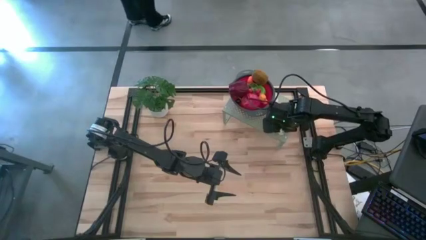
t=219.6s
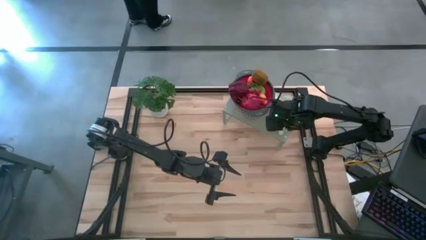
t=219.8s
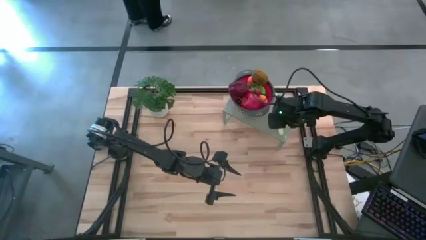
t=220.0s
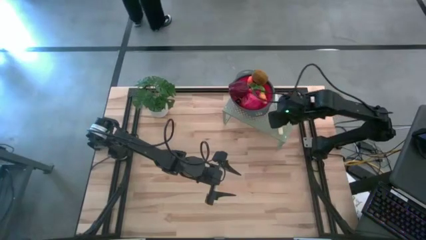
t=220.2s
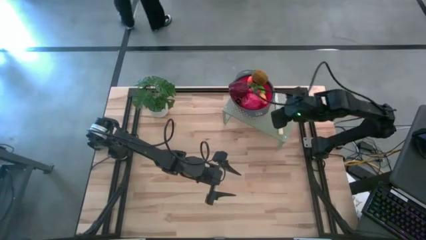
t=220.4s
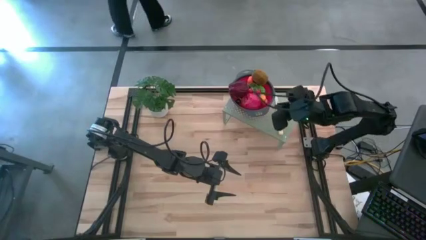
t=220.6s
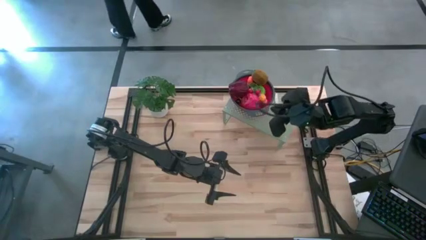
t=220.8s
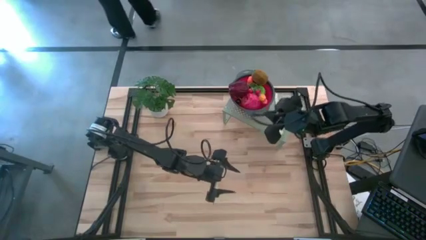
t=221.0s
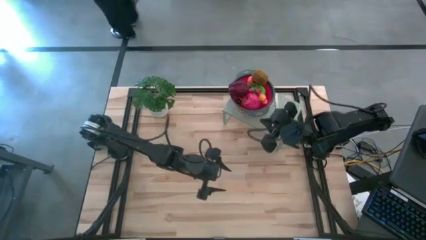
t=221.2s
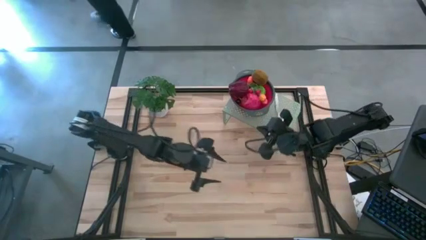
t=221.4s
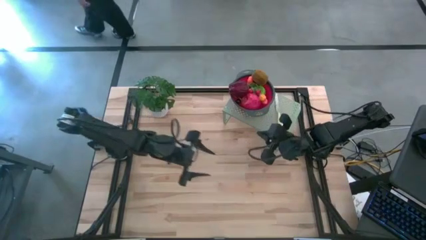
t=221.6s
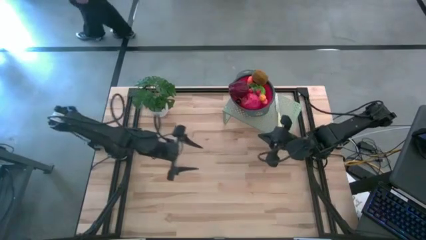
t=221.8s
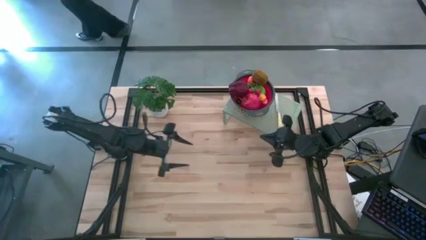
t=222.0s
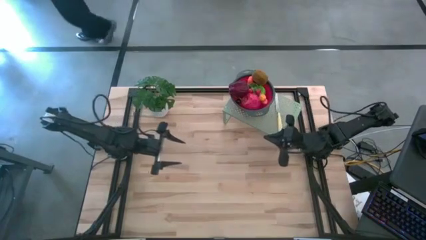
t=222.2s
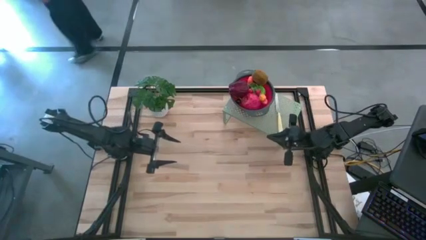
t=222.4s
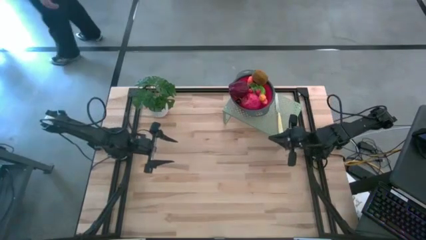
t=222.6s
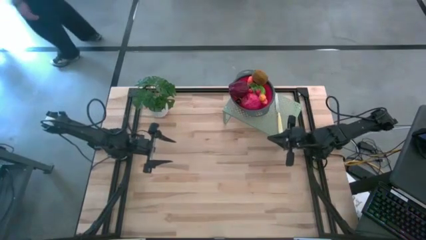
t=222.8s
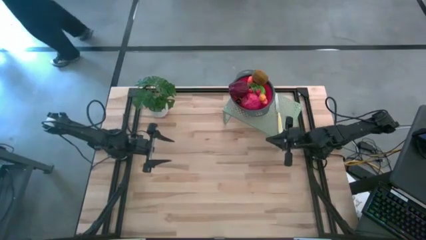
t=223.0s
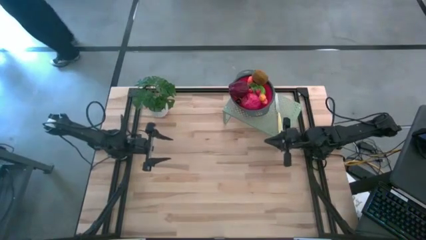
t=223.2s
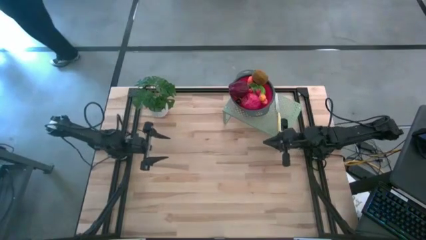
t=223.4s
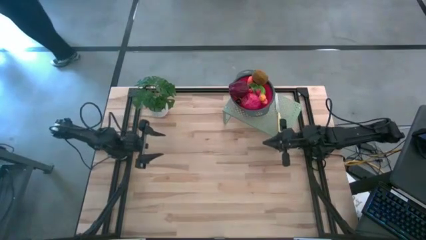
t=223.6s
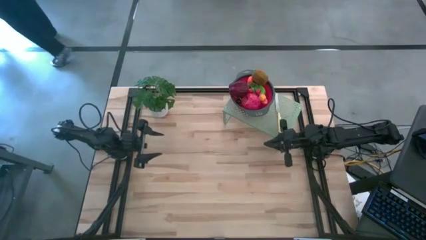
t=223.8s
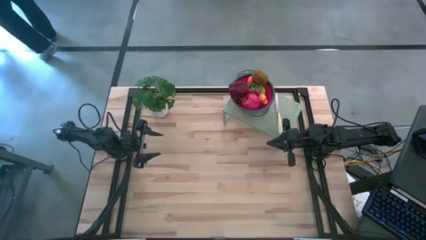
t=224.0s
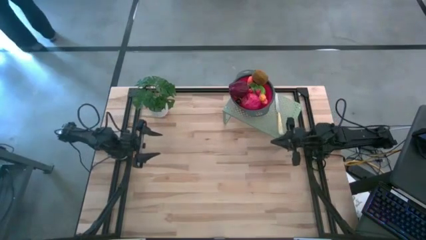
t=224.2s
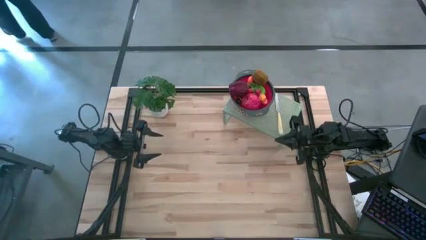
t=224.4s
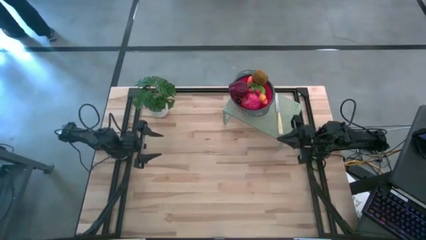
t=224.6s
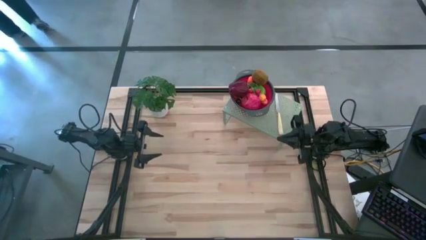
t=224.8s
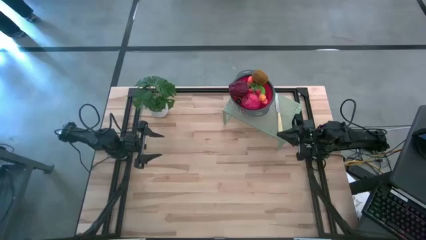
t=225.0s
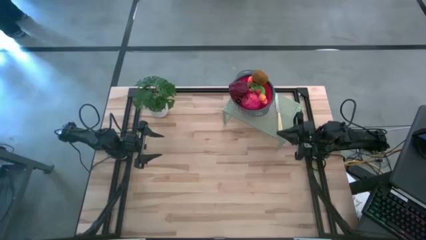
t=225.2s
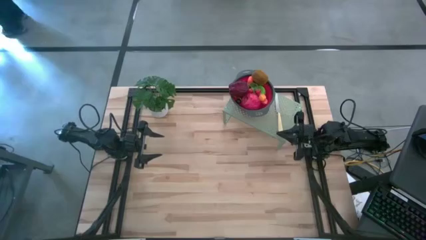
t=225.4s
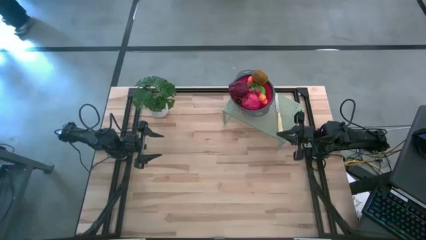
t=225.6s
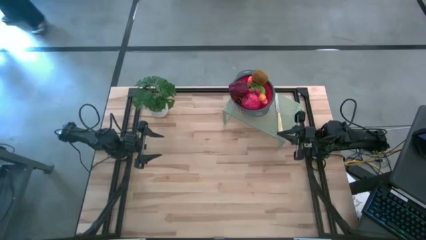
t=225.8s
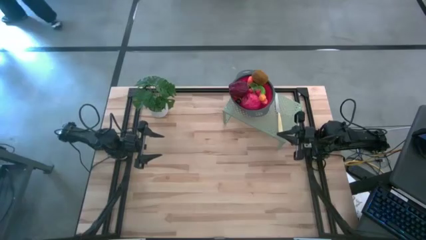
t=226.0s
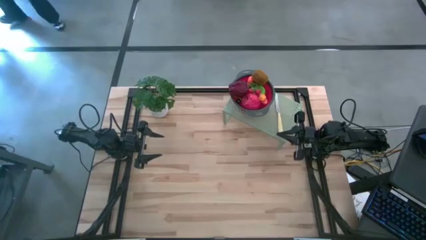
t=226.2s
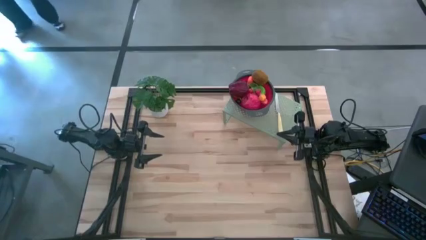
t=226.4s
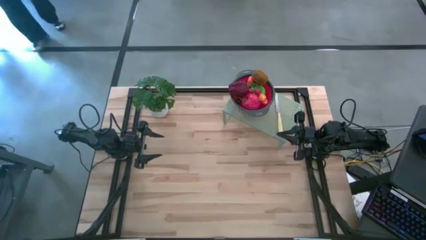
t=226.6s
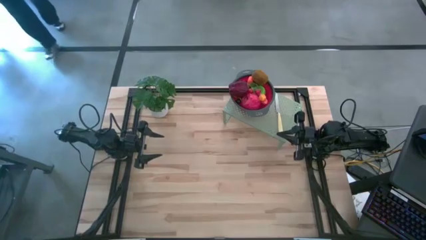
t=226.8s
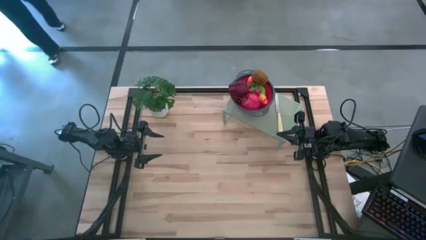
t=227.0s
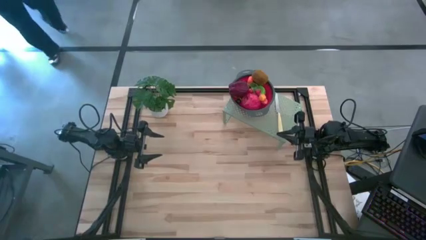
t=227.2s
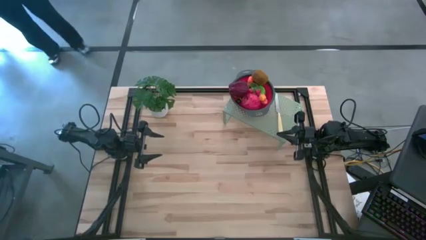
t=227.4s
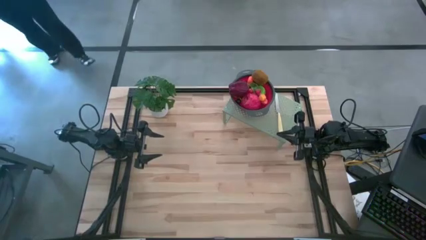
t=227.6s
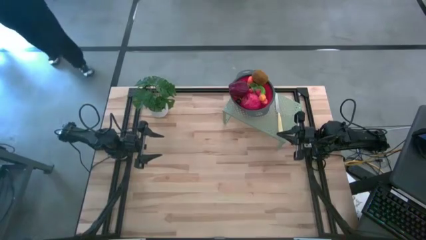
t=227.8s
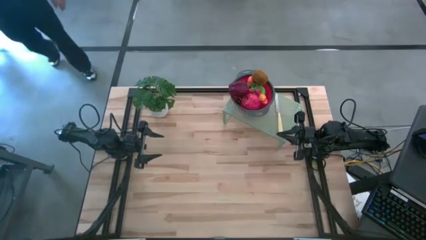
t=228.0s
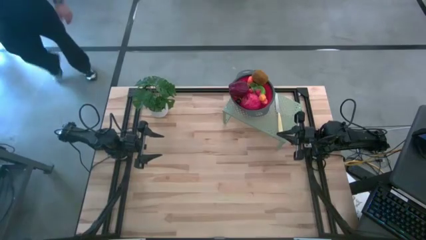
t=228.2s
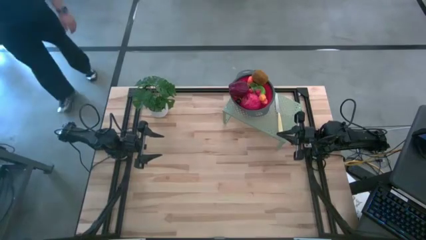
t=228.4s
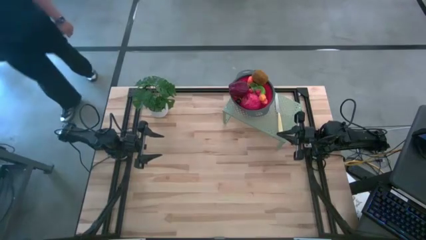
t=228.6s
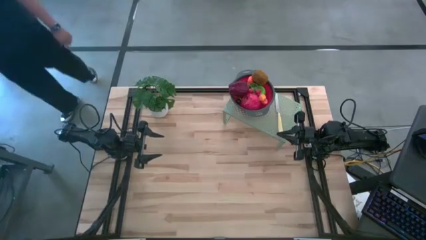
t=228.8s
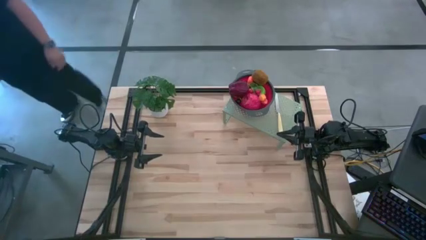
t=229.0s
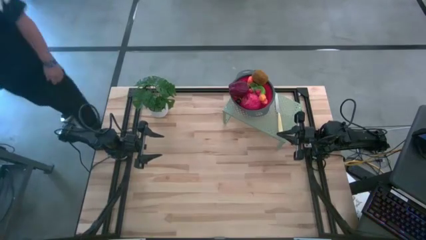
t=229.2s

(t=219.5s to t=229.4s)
Task: Pick & Place Fruit
Return to Home Position

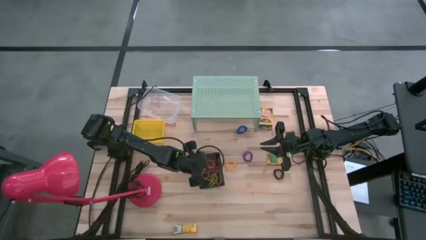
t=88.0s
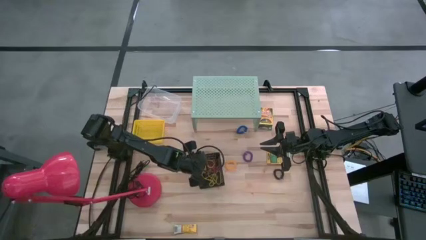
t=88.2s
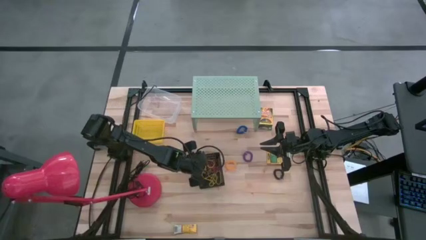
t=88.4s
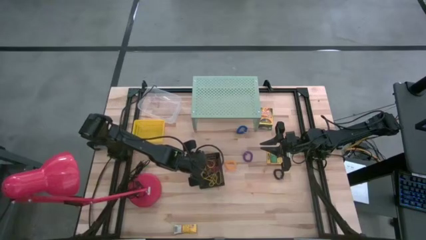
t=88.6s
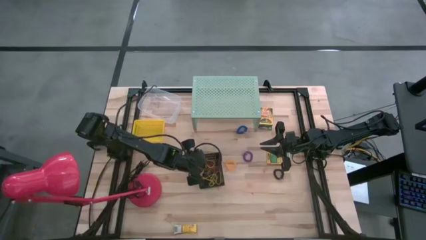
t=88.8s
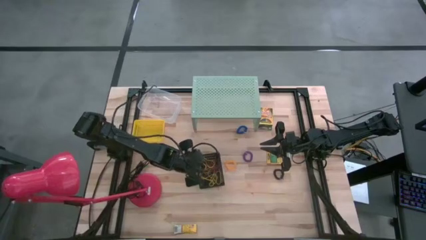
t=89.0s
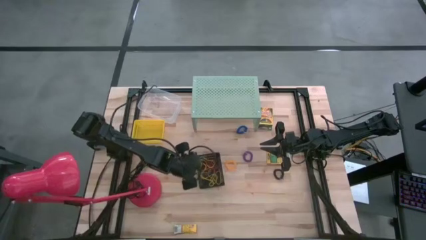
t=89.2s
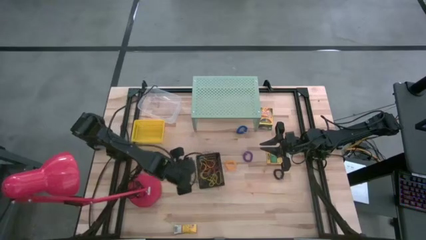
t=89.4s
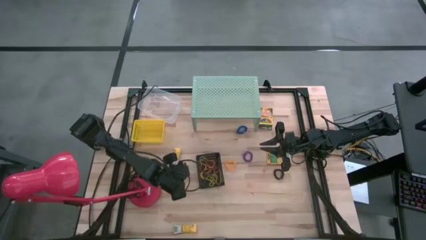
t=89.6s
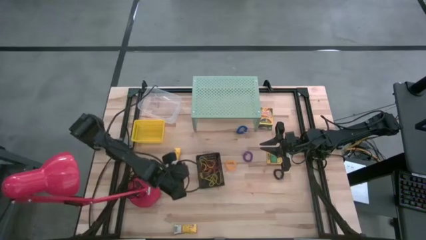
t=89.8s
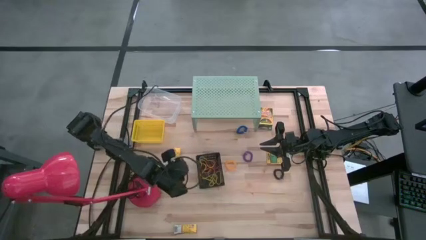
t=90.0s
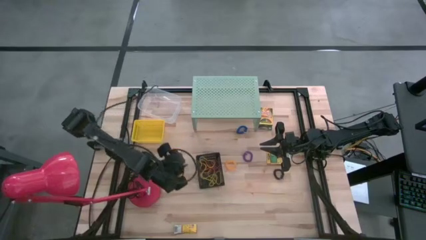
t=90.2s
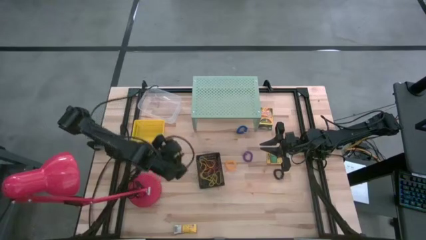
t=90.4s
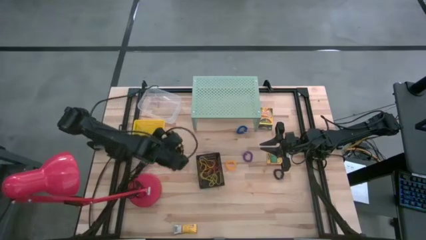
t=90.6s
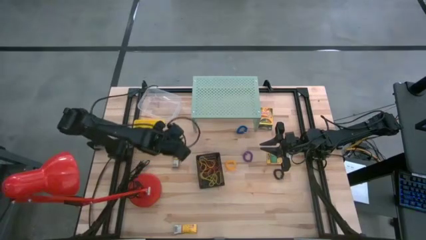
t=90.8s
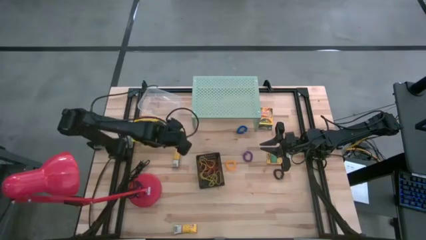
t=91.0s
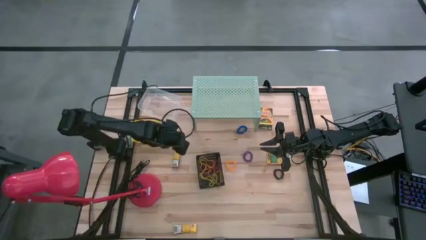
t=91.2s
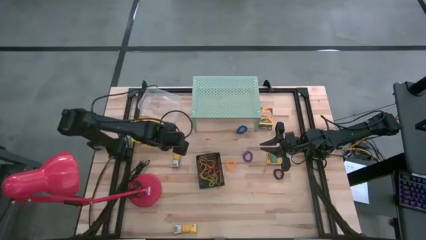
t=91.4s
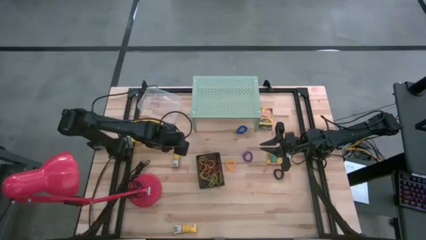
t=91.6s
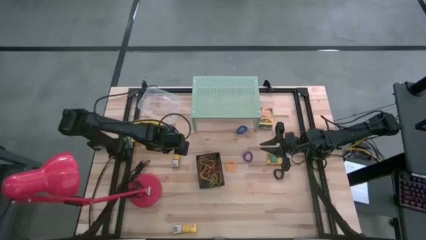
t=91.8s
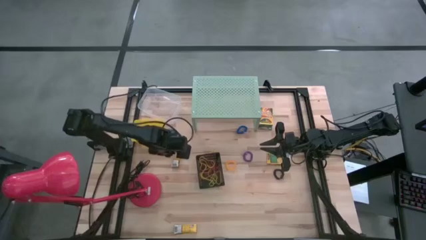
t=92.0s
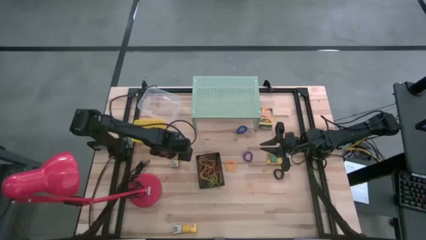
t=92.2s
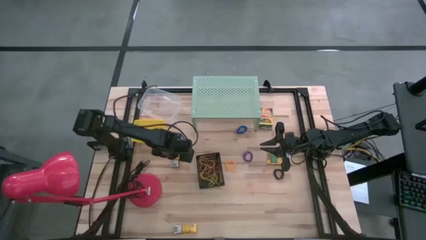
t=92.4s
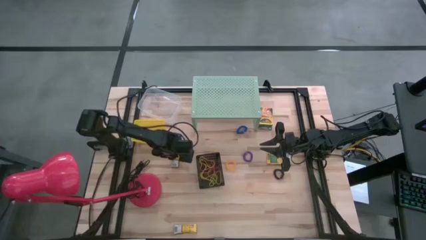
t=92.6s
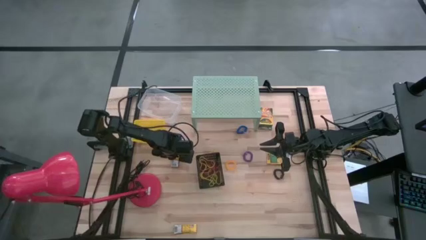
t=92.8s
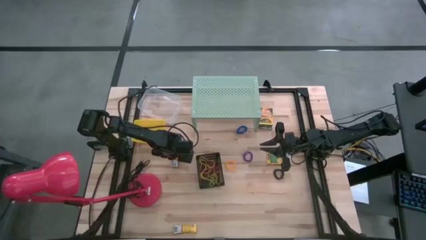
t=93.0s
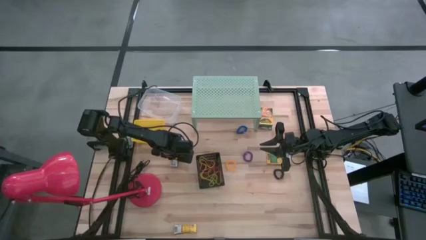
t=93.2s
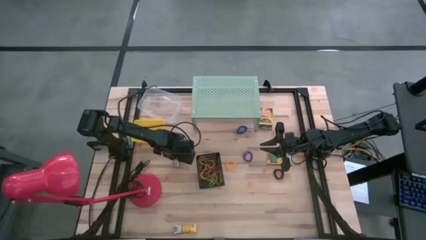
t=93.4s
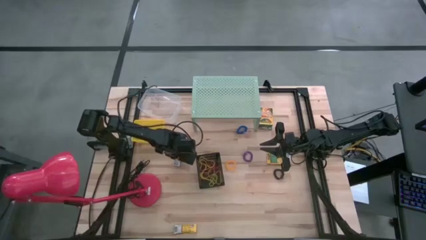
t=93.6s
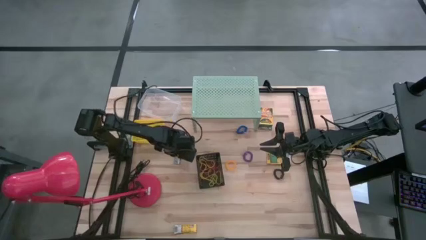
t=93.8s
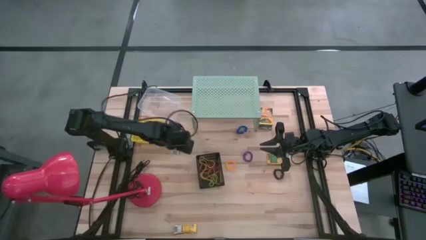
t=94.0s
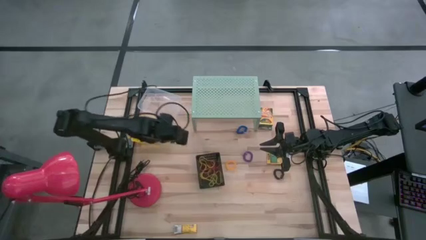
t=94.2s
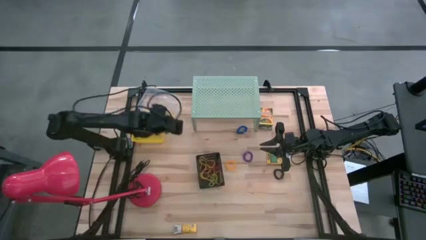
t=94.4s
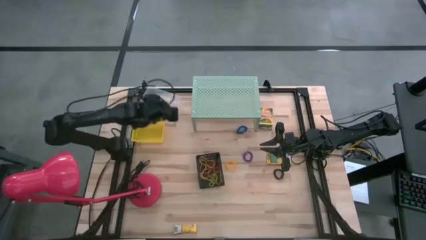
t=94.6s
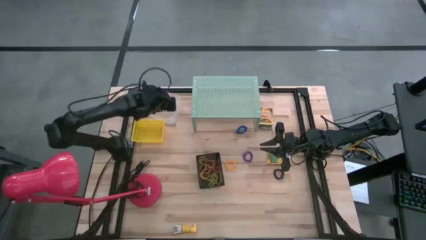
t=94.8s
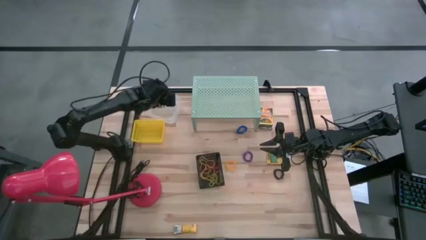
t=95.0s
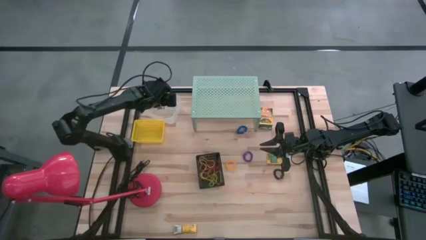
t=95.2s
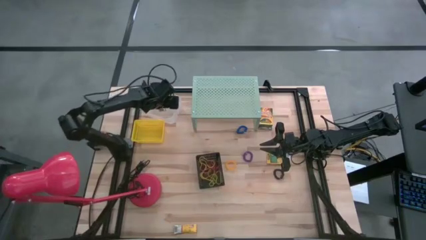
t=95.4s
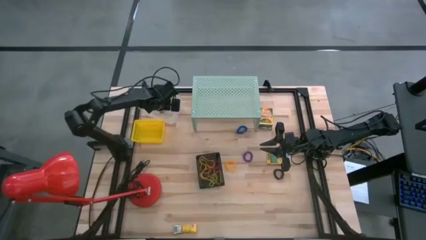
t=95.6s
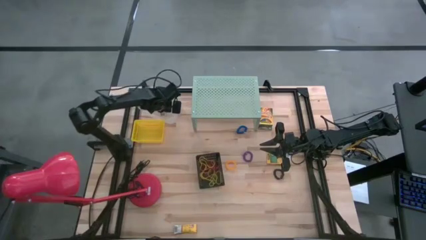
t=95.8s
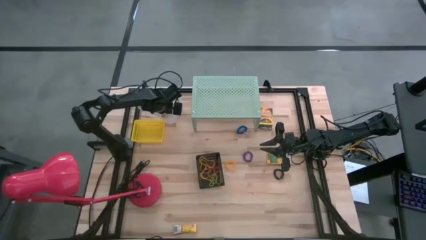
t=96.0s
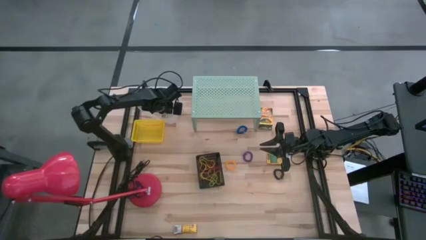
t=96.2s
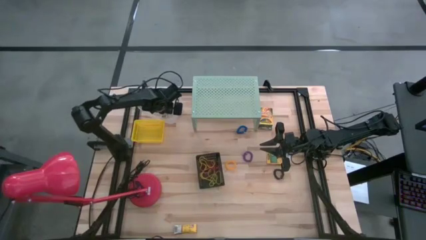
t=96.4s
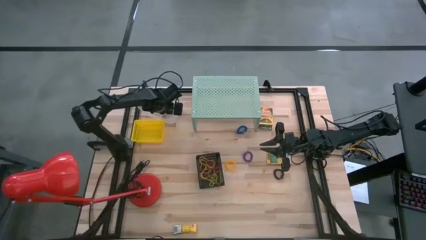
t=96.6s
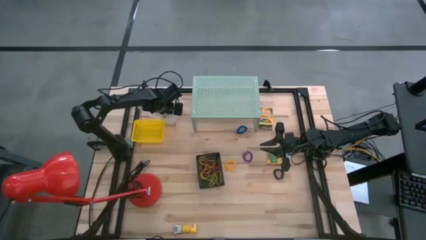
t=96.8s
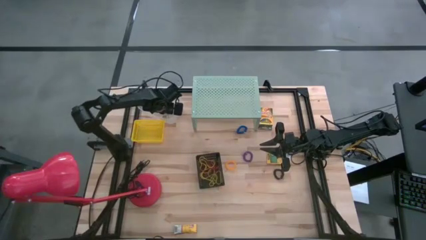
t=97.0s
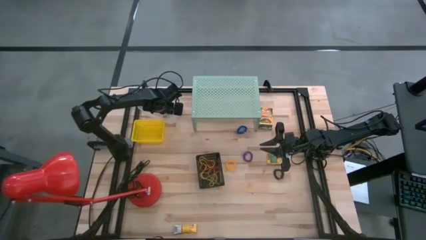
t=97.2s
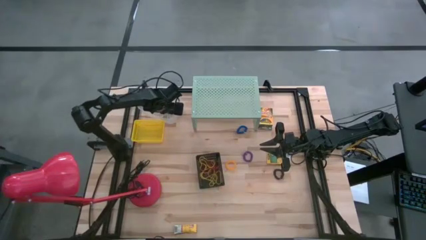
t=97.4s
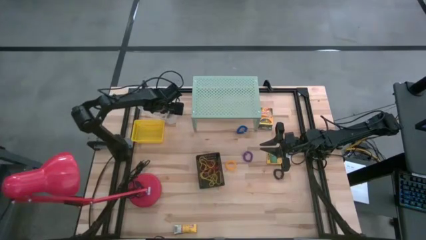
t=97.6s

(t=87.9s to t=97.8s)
Task: Pick & Place Office Desk Supplies
Put the top small crayon box into the transparent bin
